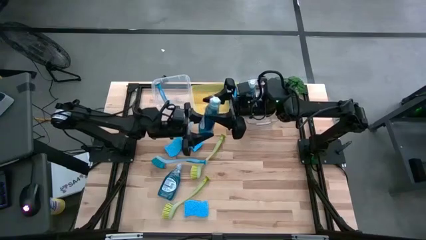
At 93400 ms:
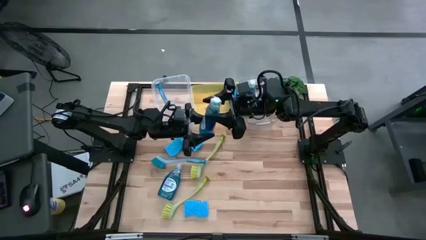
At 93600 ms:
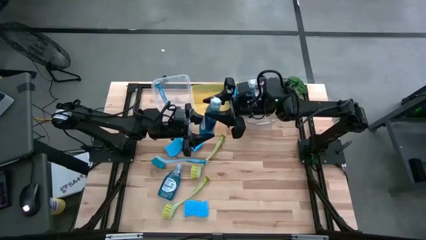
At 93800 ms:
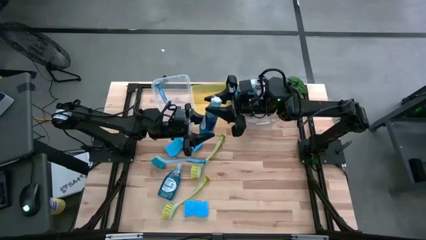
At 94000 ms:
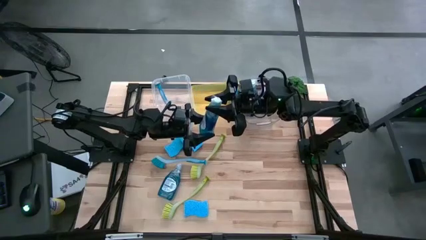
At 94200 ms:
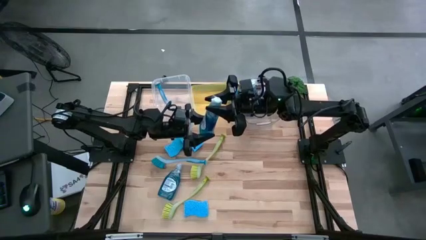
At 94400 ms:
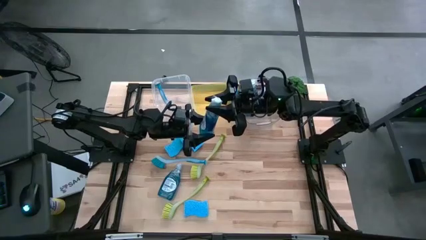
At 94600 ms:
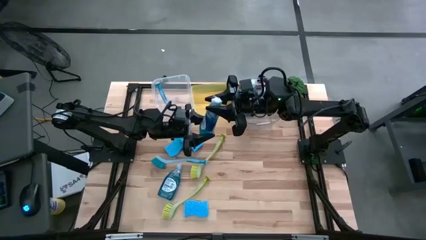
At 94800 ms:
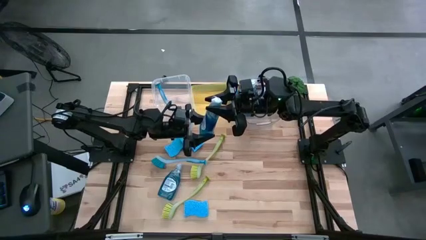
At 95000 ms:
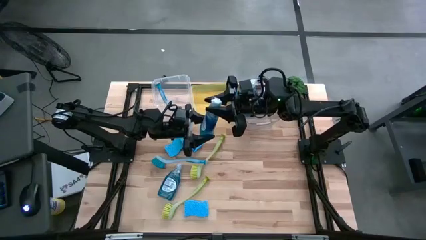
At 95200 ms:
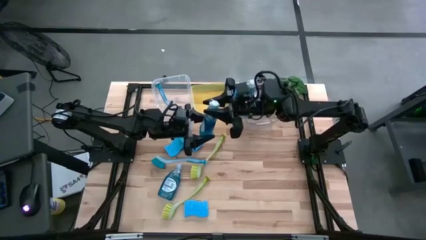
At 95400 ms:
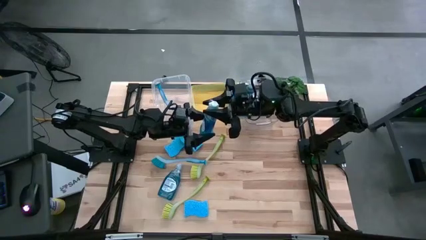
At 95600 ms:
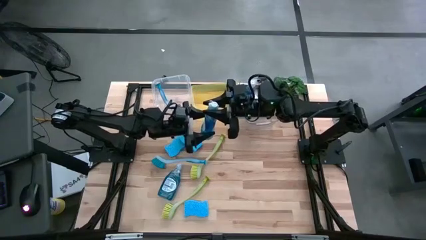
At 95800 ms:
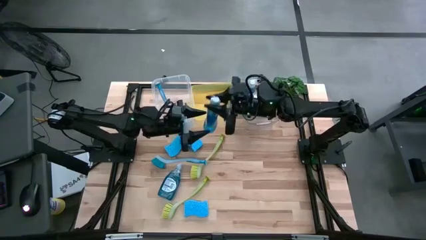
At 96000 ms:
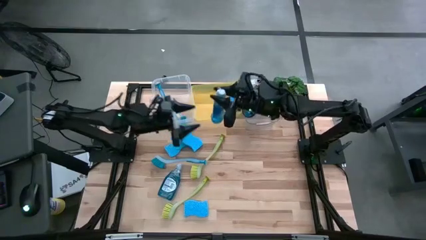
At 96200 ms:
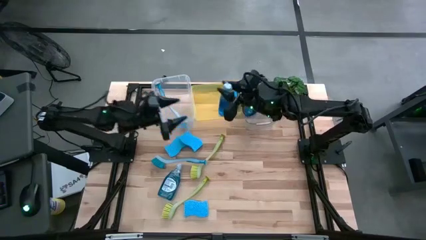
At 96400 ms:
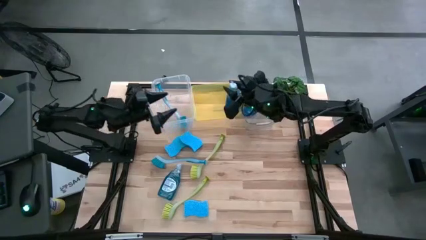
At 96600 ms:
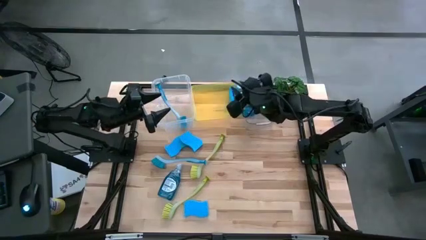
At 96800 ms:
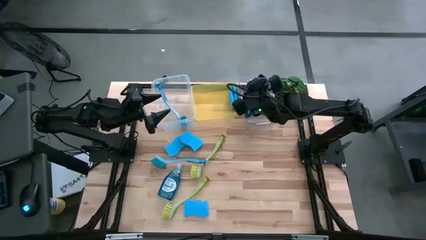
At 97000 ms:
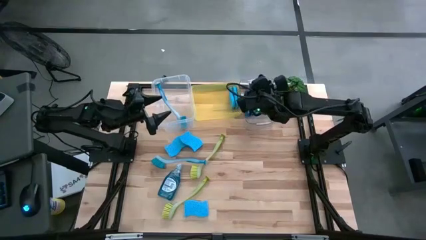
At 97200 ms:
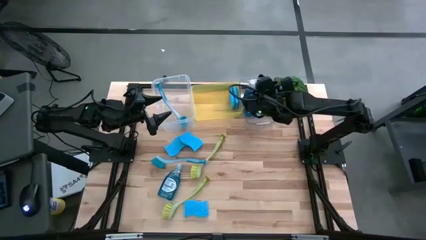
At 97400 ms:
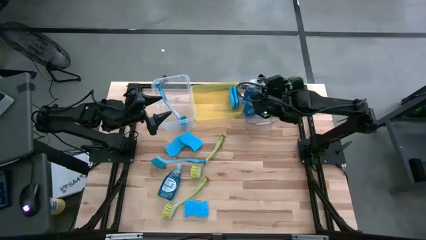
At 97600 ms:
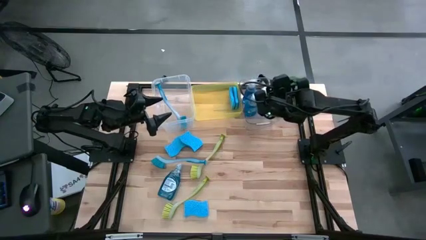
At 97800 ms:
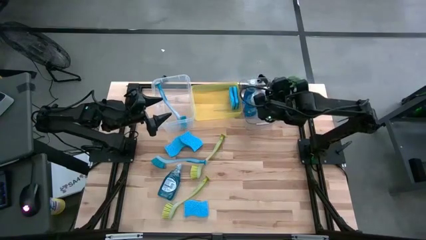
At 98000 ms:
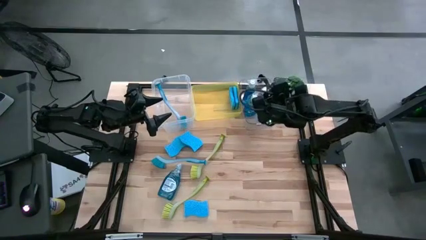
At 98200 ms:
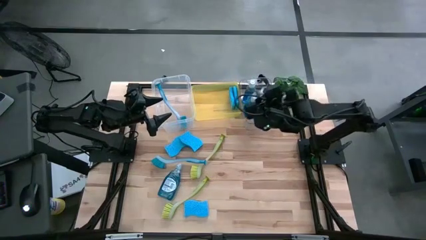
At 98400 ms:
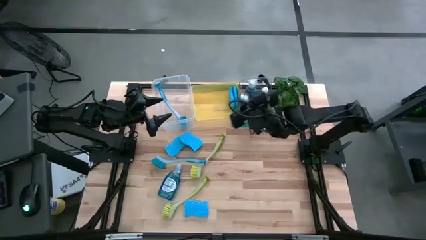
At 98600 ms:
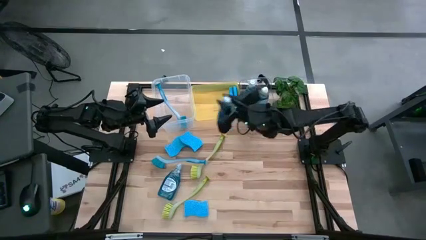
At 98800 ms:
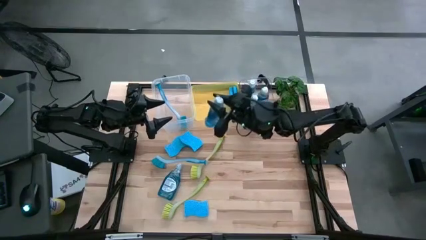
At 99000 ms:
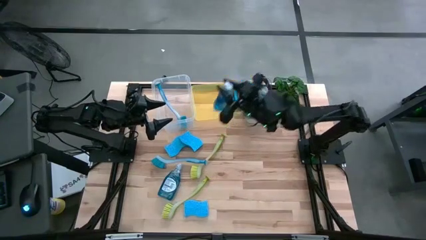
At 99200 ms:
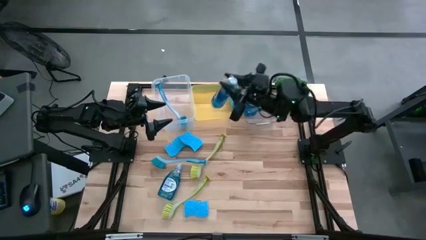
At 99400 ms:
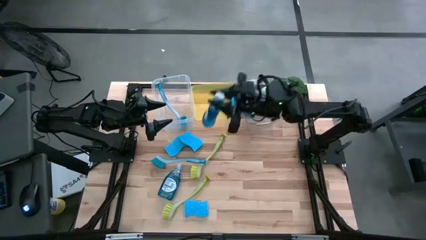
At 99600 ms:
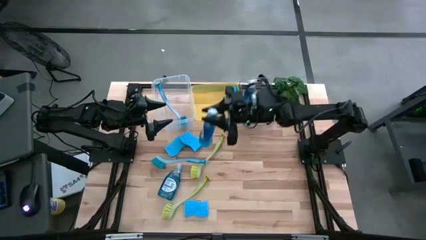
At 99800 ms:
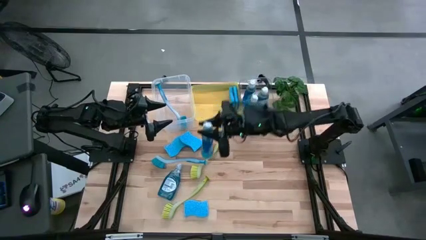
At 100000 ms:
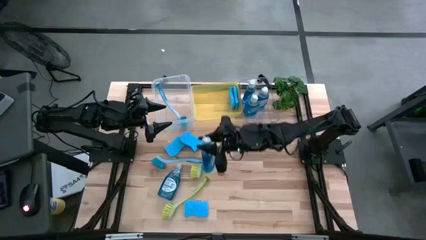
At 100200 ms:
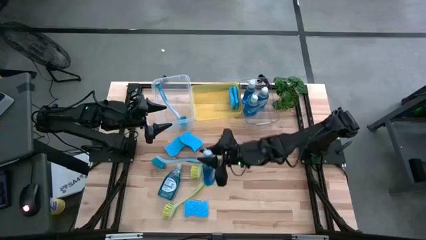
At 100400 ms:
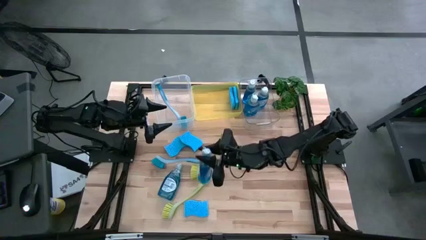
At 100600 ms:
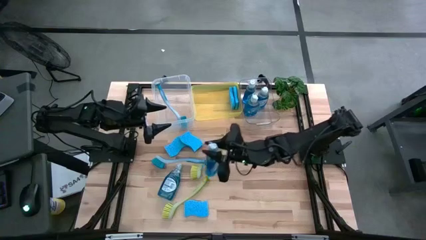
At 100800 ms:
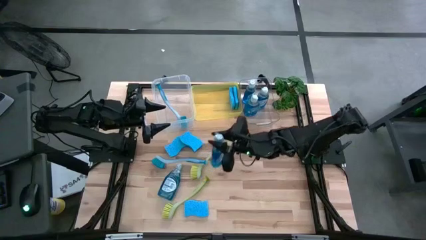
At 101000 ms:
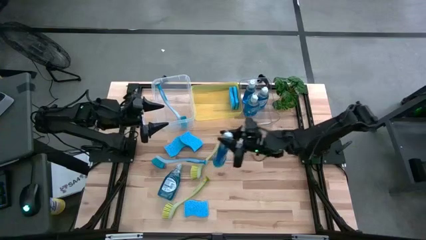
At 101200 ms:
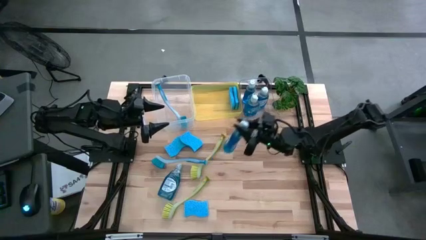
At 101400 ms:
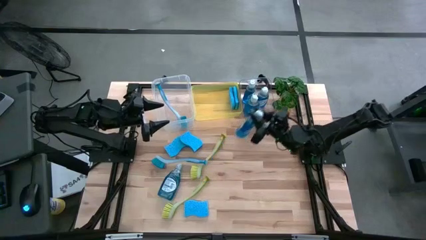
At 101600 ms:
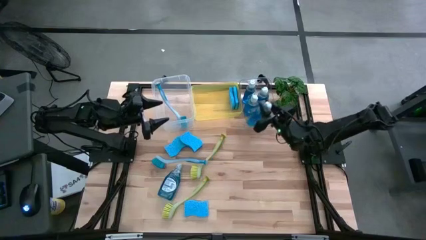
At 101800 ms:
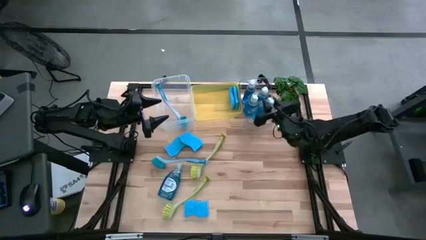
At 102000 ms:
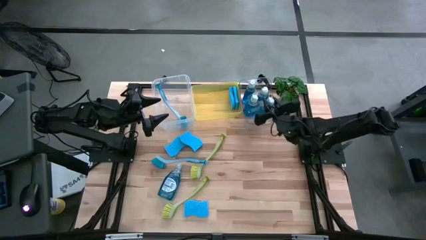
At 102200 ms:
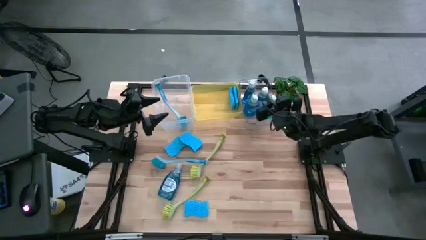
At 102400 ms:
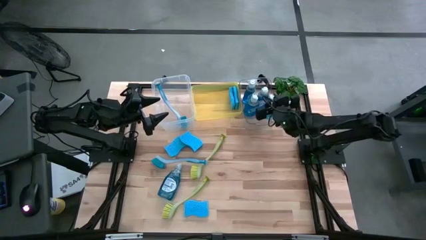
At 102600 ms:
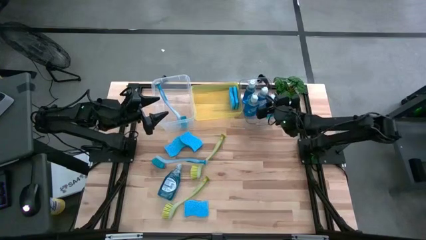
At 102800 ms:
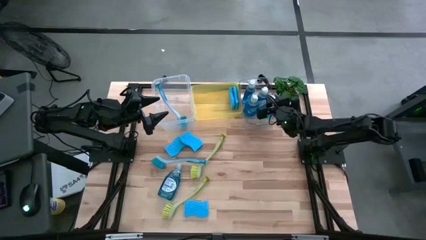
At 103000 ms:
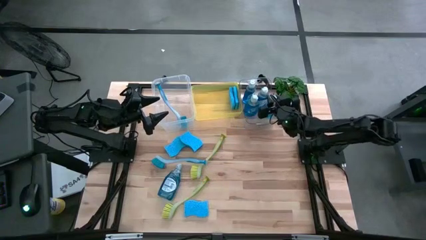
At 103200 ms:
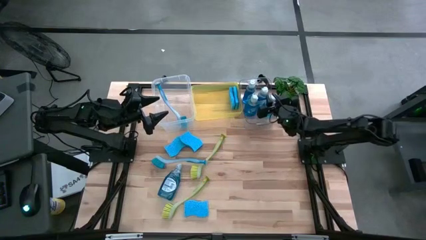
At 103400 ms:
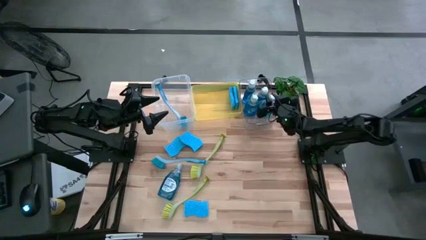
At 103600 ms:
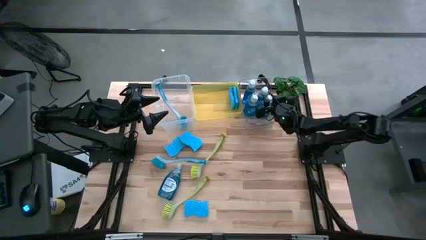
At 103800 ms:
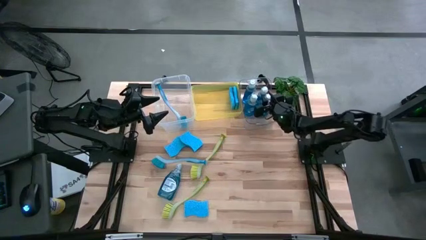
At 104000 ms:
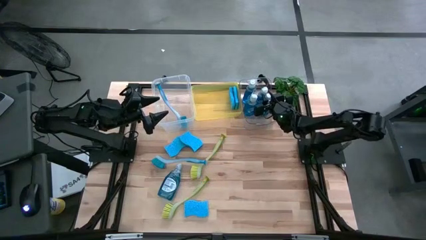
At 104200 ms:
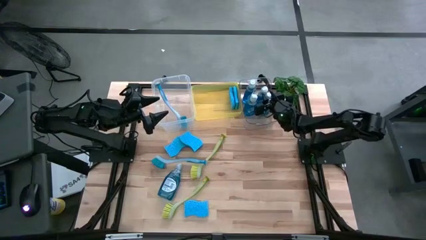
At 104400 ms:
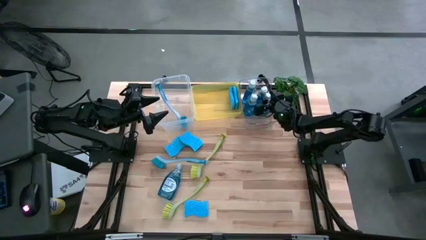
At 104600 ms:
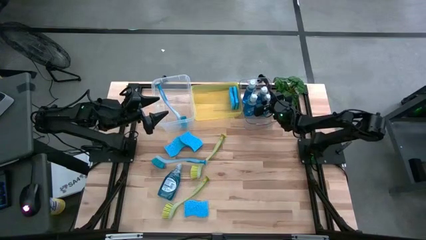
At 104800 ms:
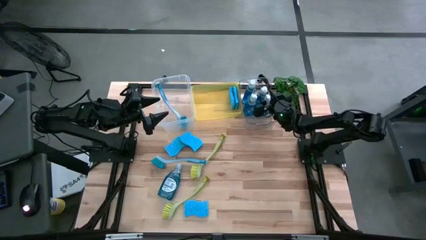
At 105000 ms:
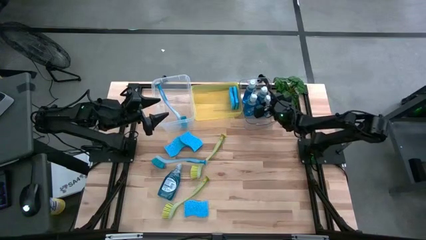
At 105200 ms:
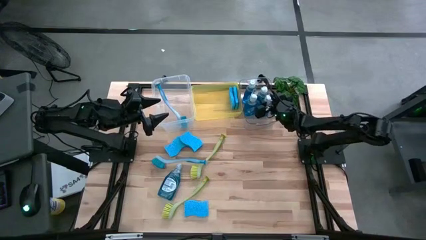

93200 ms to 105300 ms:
Task: Pick & Place Kitchen Sink Supplies
Put the blue dishwasher liquid into the transparent bin

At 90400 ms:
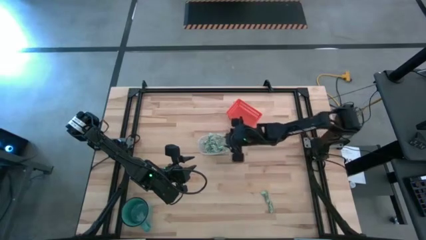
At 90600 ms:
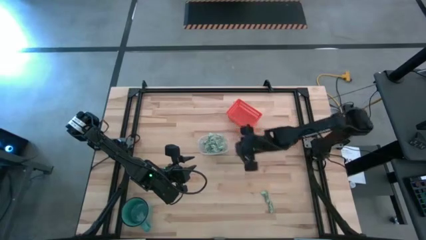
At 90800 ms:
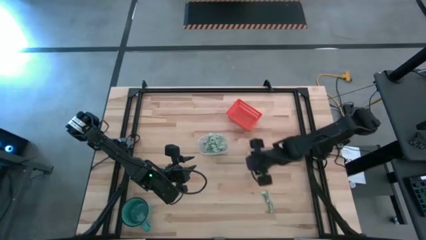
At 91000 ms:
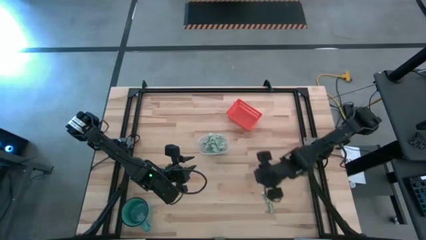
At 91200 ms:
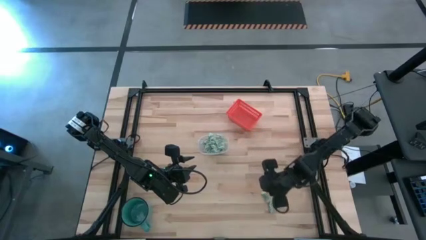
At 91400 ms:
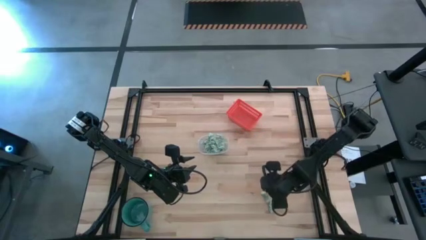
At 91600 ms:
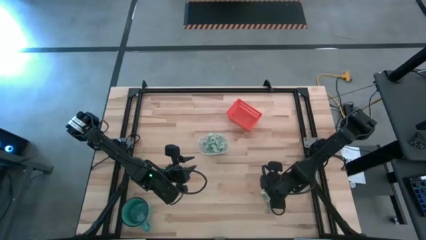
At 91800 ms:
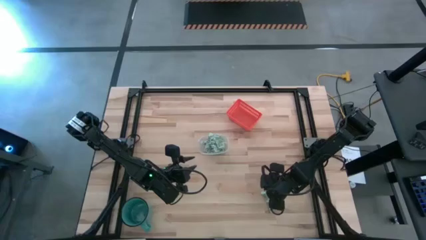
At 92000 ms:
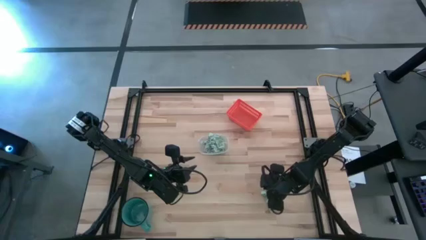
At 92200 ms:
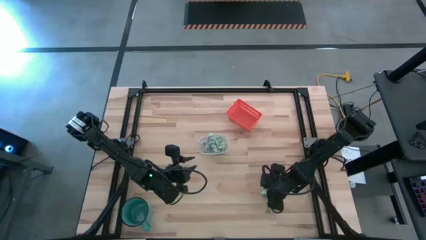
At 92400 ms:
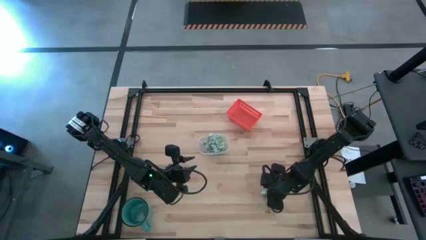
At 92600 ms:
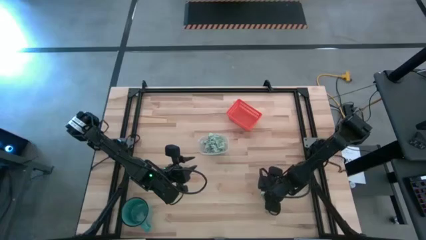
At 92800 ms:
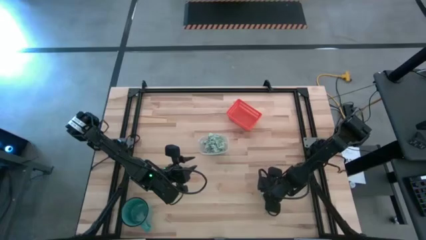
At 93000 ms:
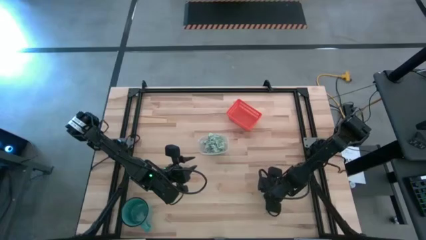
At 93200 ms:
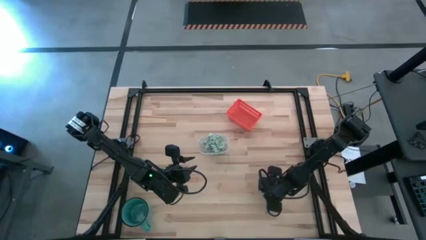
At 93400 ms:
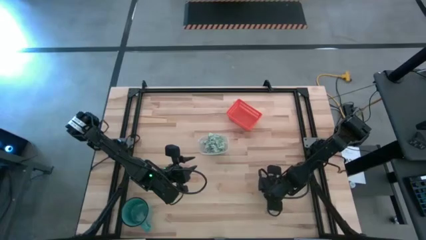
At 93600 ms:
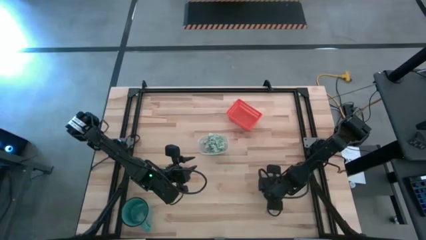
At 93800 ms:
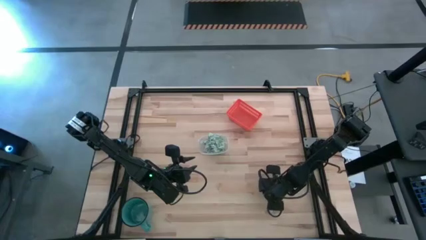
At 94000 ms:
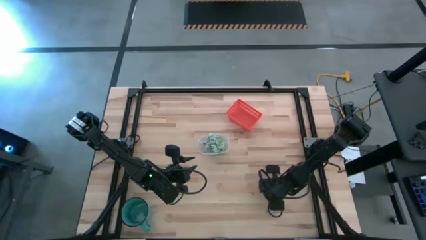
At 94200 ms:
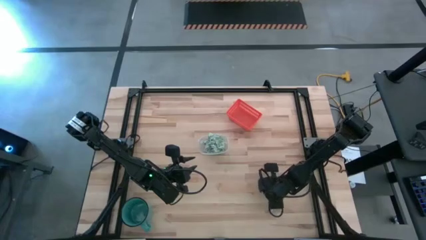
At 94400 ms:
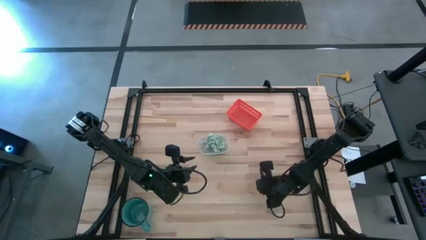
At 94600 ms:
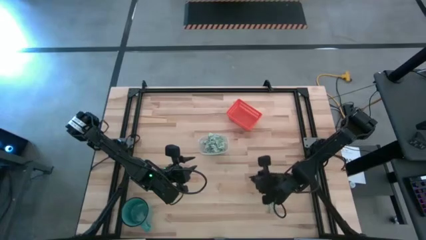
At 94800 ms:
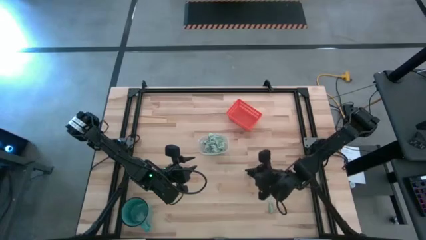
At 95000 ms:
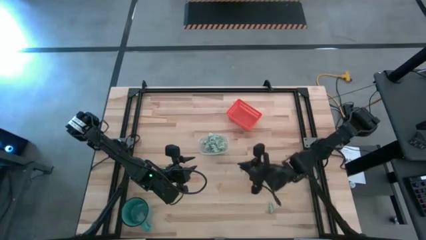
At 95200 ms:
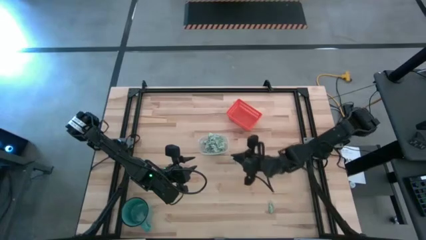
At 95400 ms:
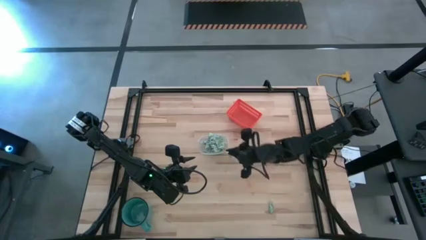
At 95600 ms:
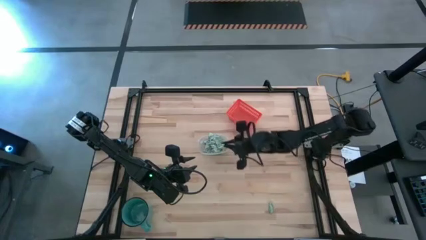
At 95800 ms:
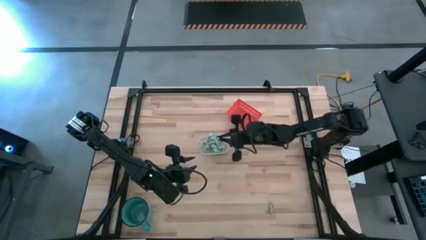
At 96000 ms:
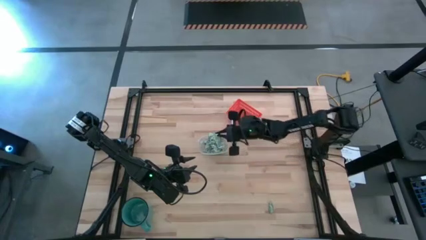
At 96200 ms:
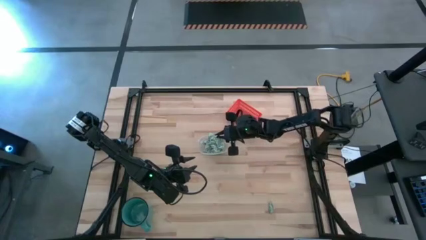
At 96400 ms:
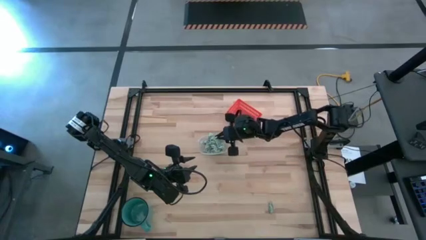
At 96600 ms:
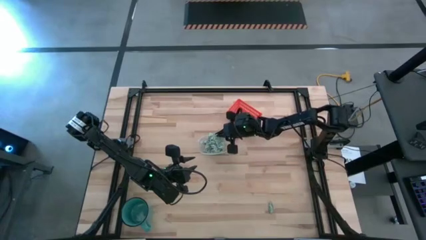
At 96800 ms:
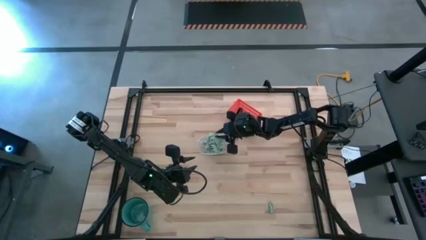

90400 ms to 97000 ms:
Task: Pick and place items into bin
Put the stevia packet into the transparent bin
